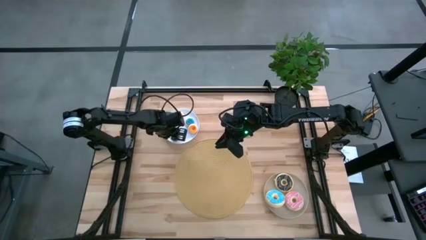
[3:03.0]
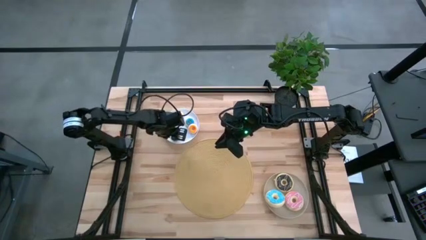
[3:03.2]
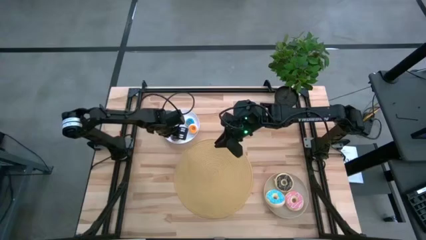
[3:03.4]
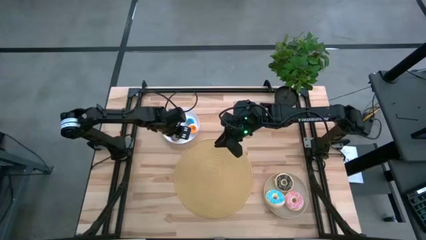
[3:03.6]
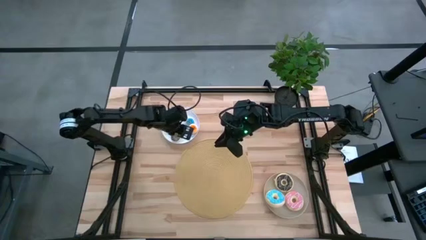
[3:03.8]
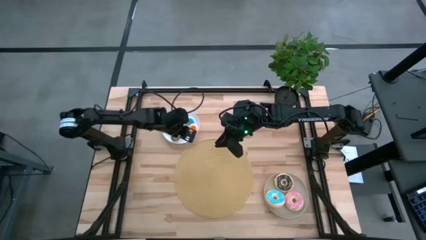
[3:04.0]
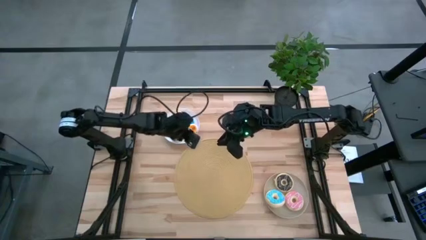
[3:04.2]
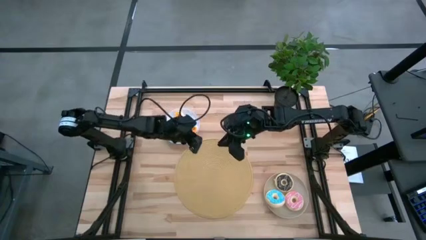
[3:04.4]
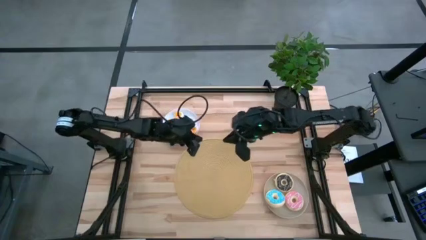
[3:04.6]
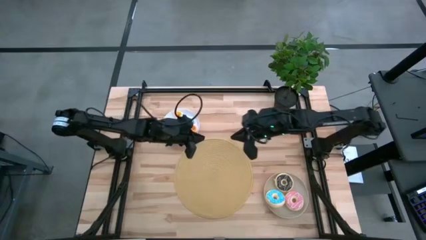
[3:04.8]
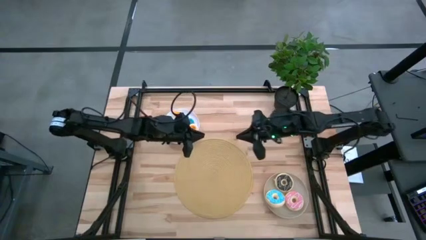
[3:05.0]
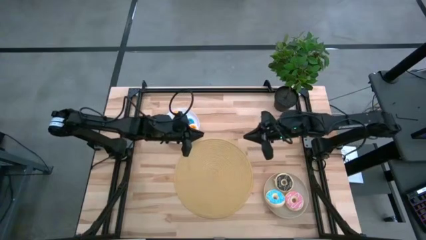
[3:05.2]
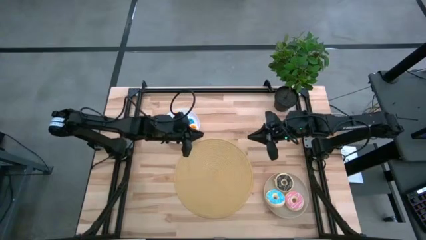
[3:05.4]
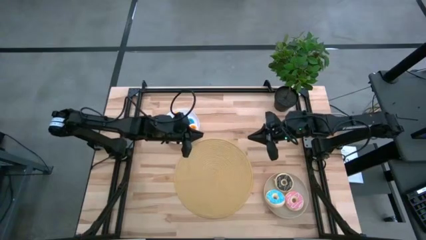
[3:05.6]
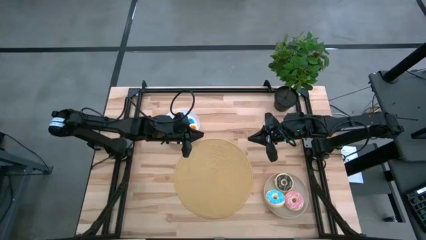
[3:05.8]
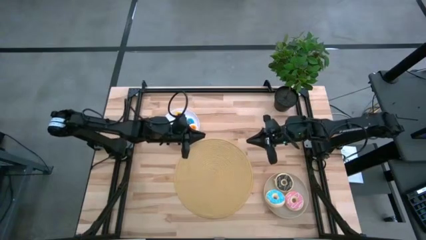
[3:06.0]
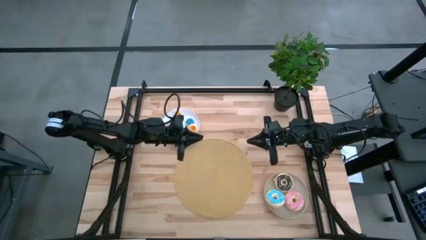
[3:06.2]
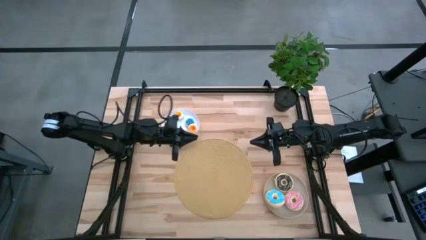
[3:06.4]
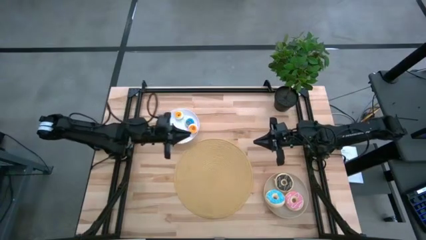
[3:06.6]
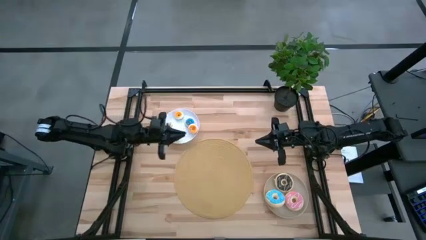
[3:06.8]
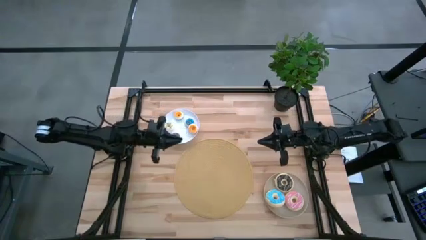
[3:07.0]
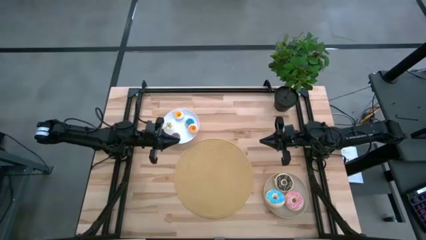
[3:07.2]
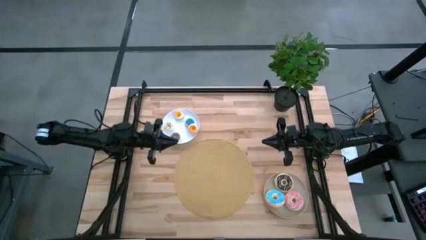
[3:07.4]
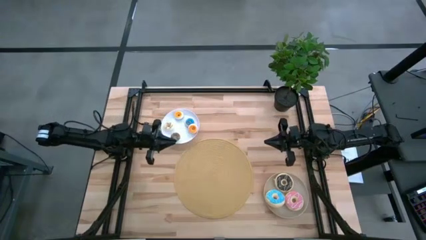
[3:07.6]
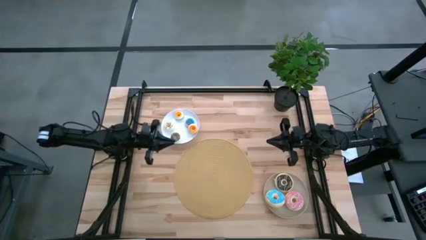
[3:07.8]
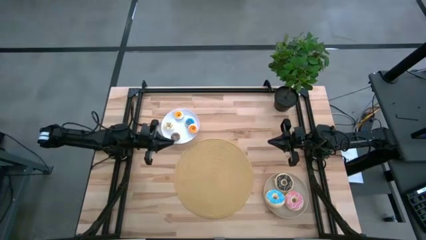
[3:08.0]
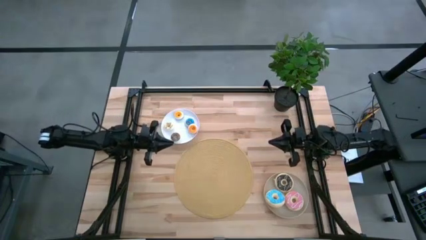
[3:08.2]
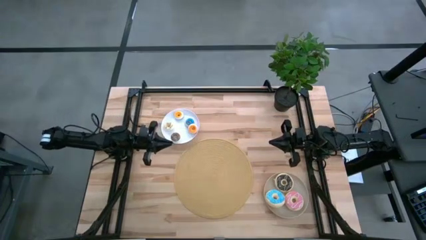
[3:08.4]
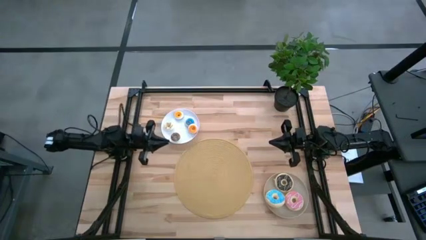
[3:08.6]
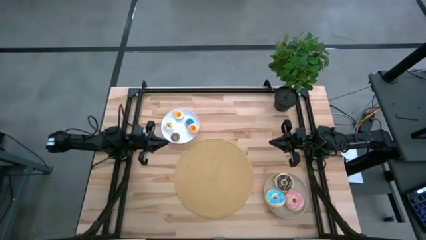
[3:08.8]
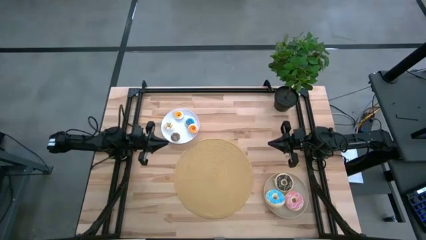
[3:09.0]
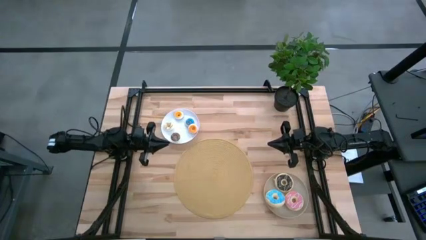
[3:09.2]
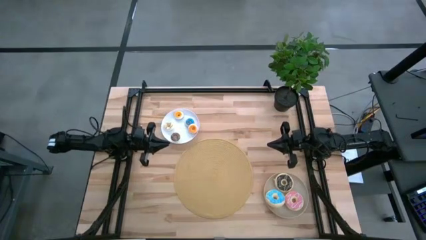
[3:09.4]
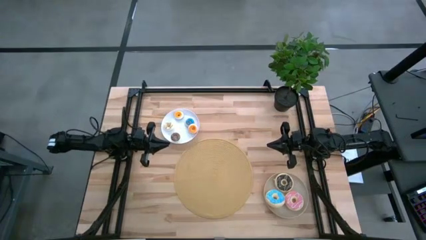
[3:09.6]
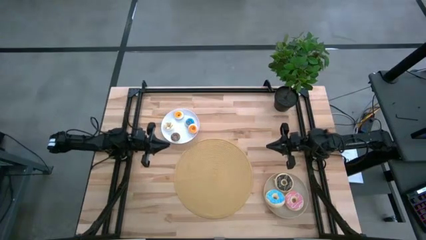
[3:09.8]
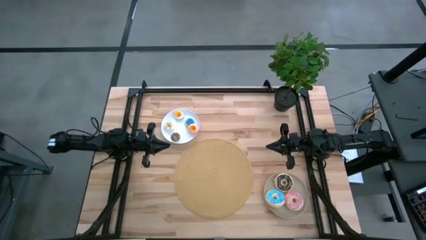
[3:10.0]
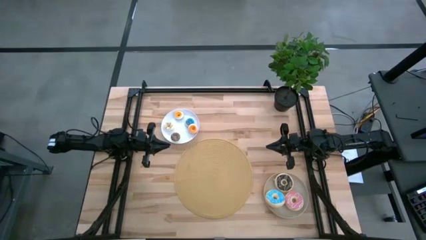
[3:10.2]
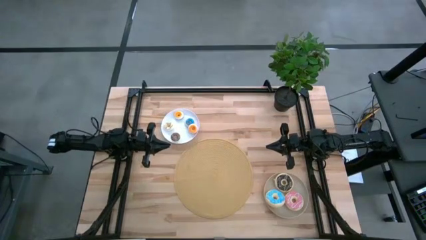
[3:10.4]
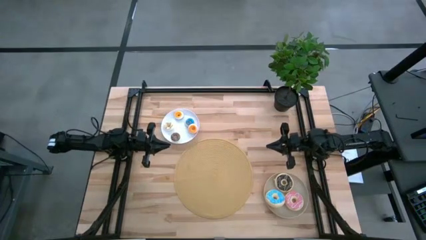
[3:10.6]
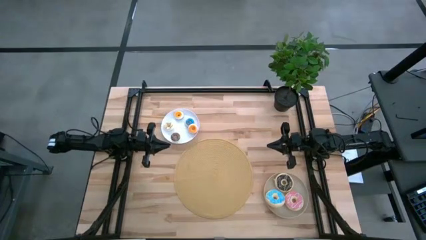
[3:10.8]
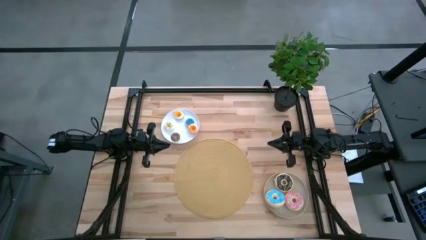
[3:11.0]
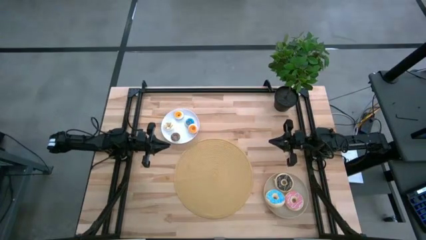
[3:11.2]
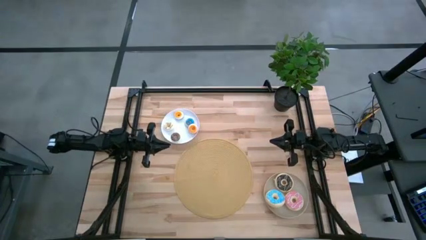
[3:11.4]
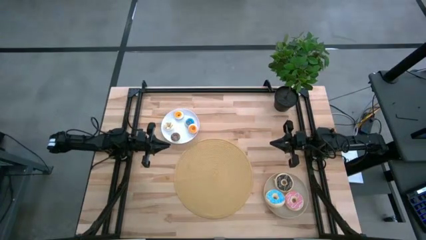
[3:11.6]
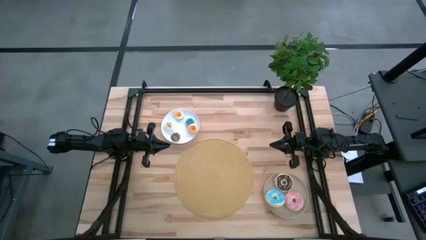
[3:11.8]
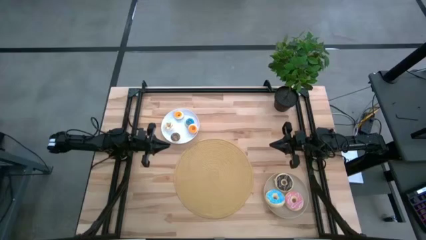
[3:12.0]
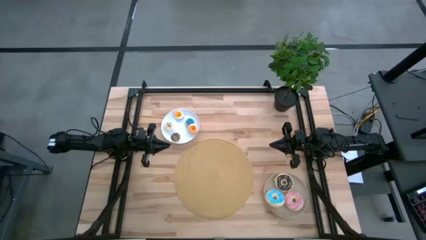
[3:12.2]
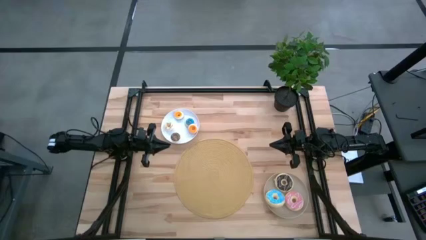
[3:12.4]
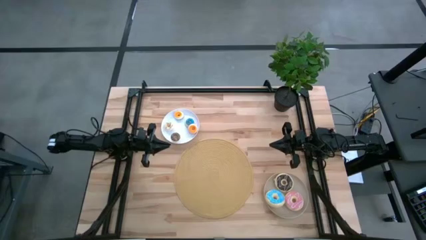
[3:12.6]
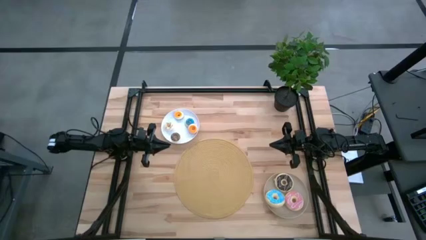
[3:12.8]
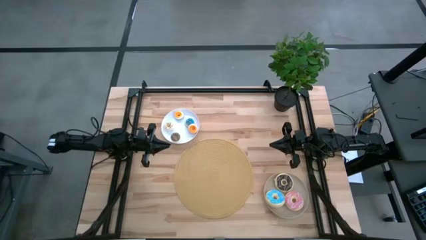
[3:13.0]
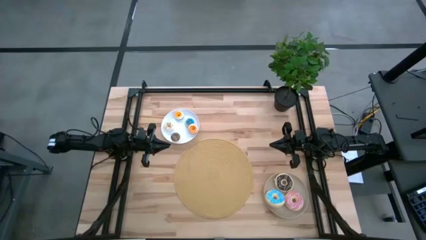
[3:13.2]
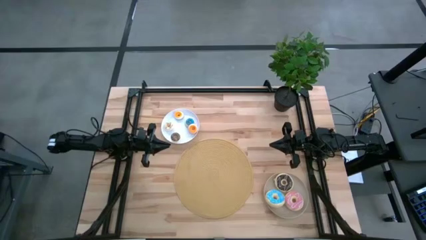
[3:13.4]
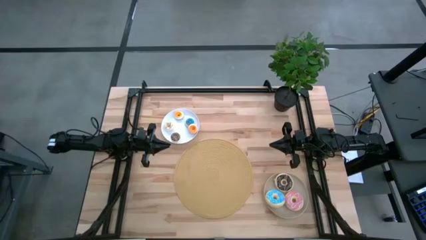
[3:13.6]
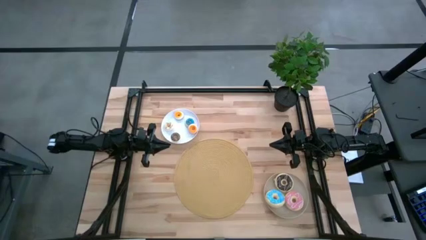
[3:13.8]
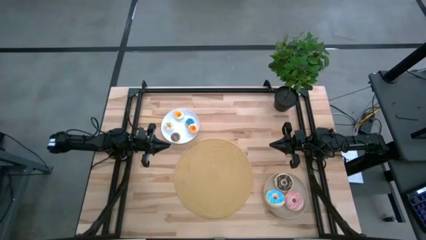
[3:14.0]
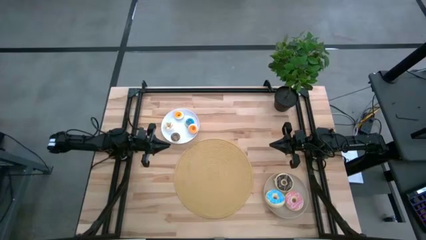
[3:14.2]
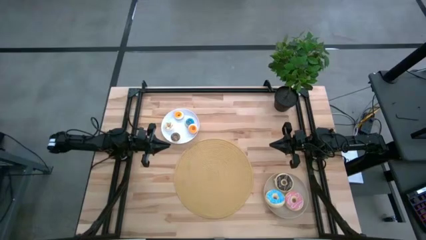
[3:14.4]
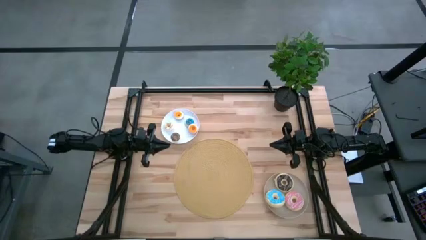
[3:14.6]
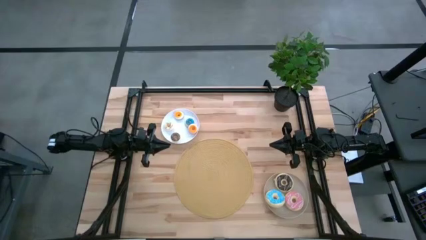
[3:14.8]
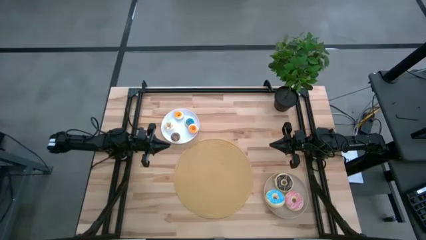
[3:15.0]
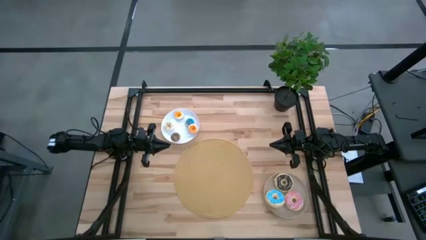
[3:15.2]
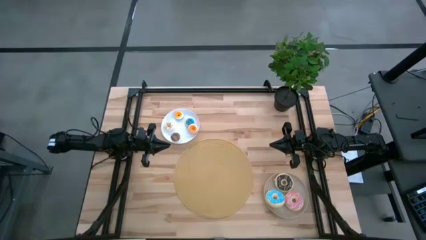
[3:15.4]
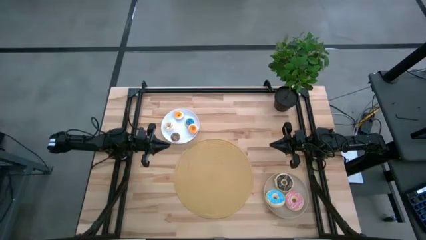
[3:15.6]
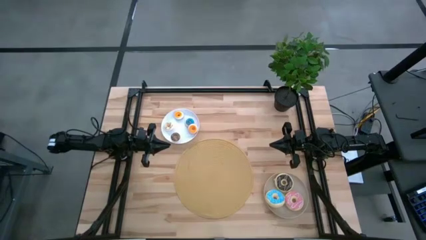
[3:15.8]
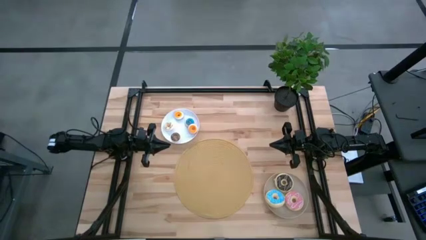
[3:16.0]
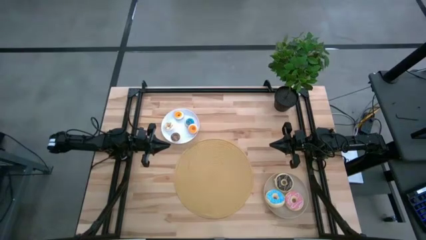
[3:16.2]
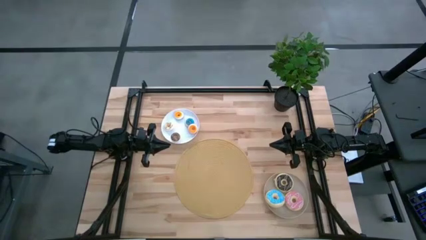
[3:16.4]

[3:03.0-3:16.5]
Task: Pick & Place donuts
Return to Home Position
